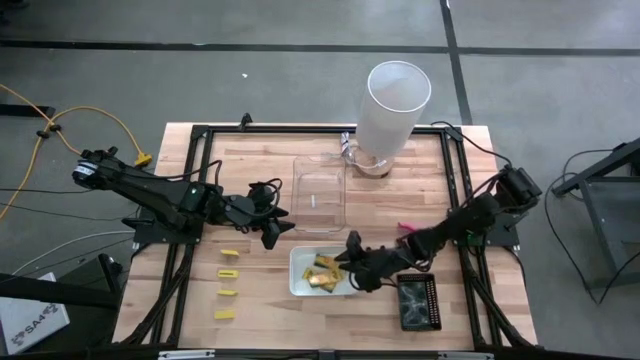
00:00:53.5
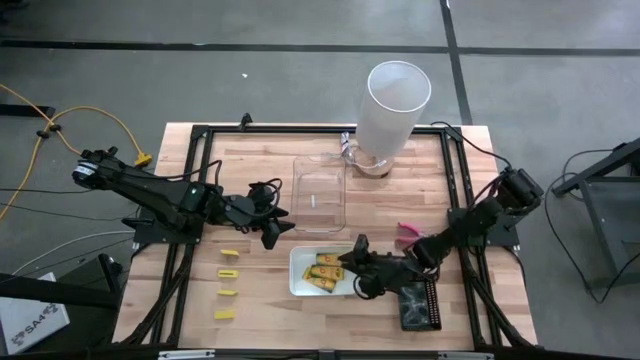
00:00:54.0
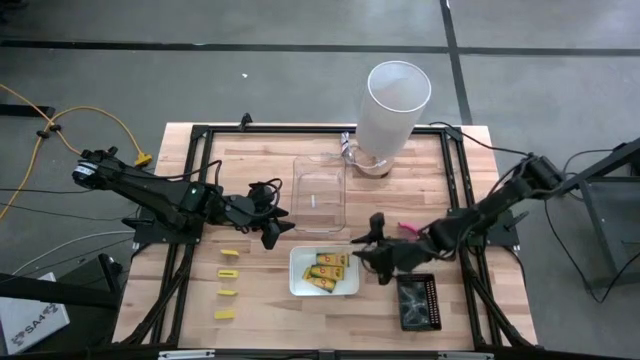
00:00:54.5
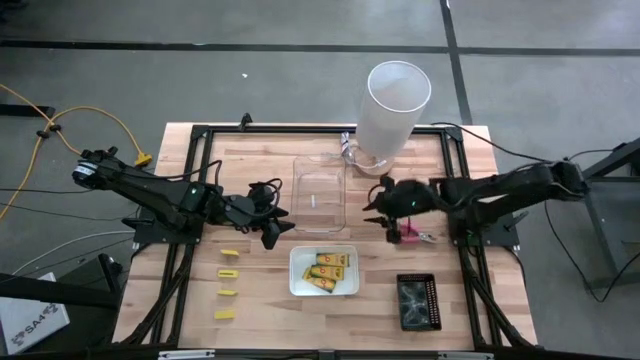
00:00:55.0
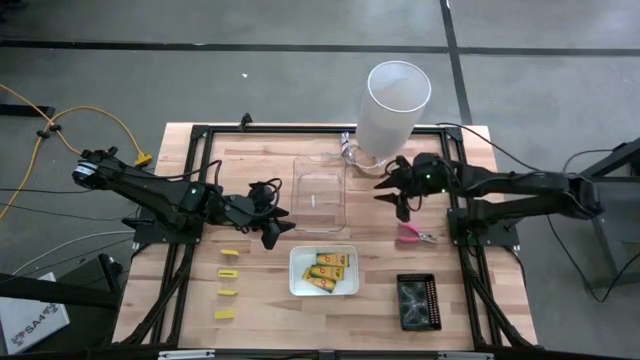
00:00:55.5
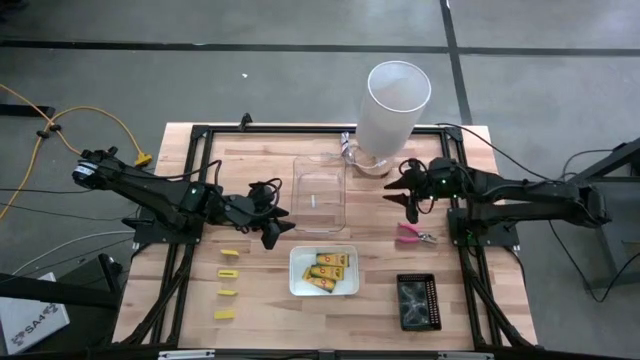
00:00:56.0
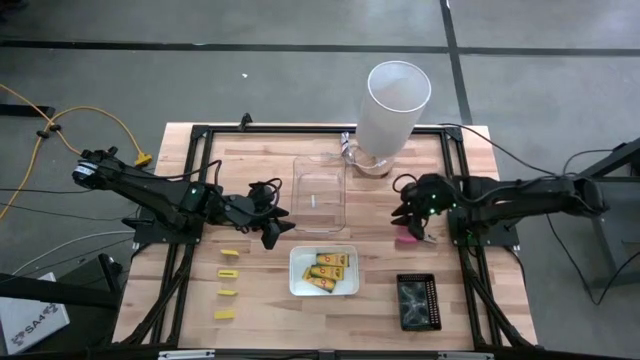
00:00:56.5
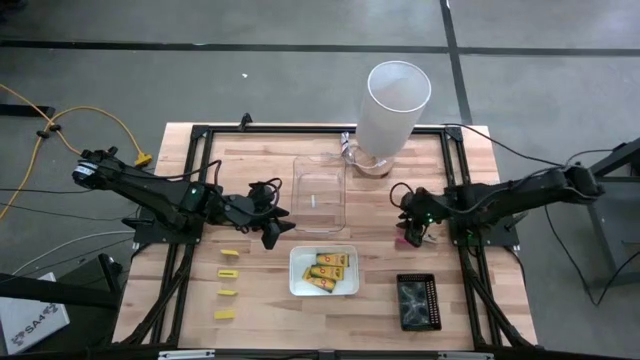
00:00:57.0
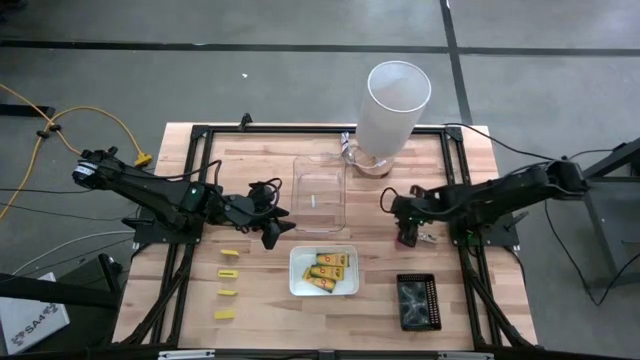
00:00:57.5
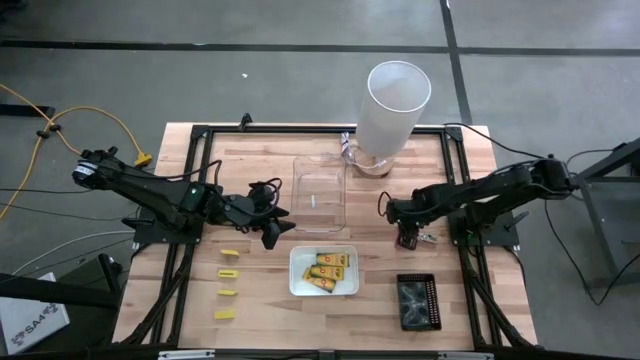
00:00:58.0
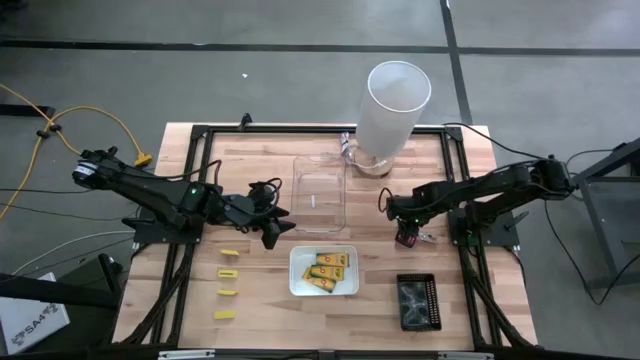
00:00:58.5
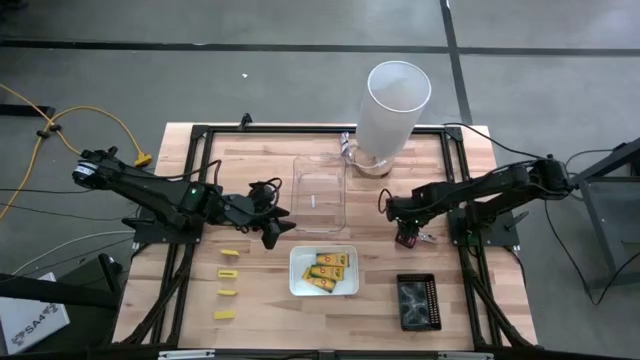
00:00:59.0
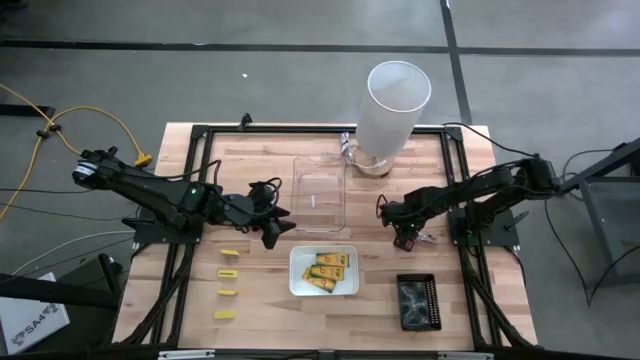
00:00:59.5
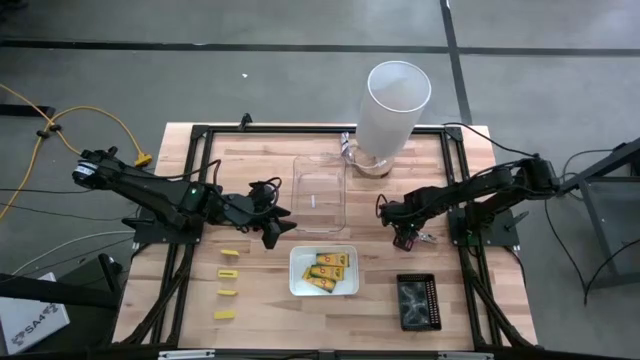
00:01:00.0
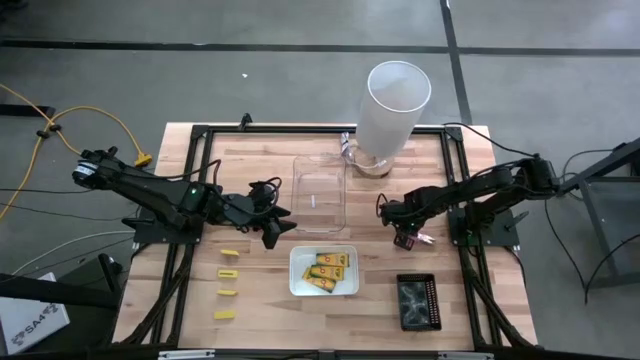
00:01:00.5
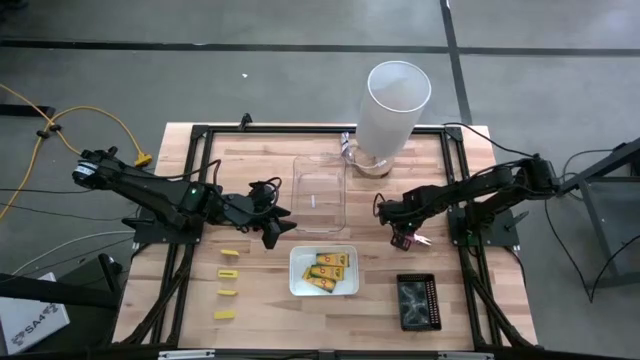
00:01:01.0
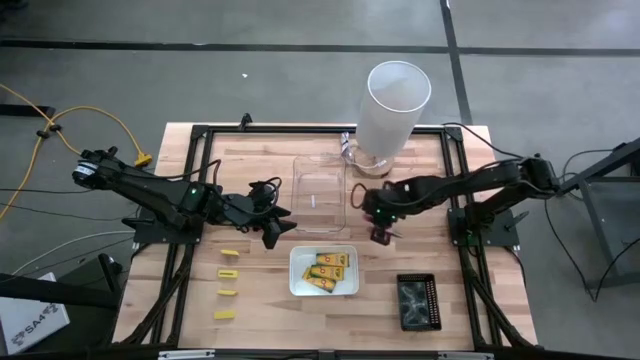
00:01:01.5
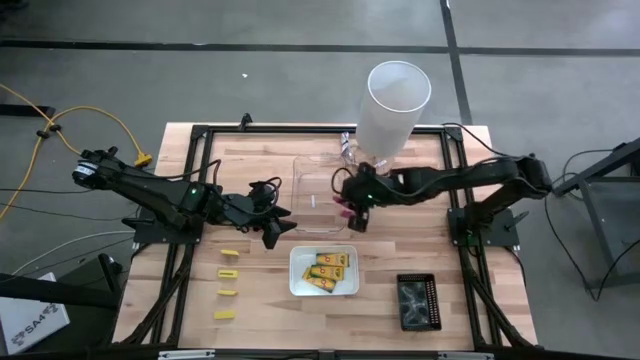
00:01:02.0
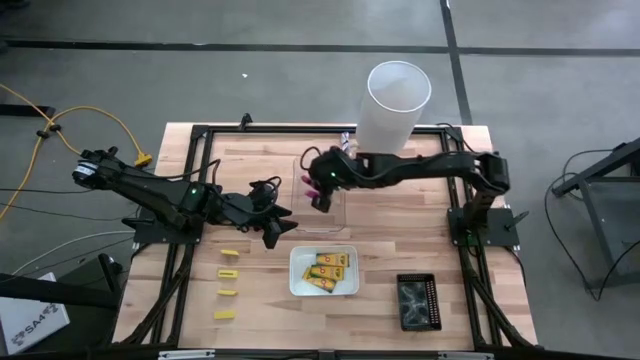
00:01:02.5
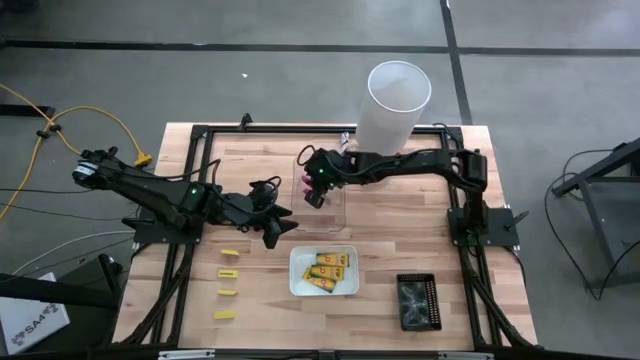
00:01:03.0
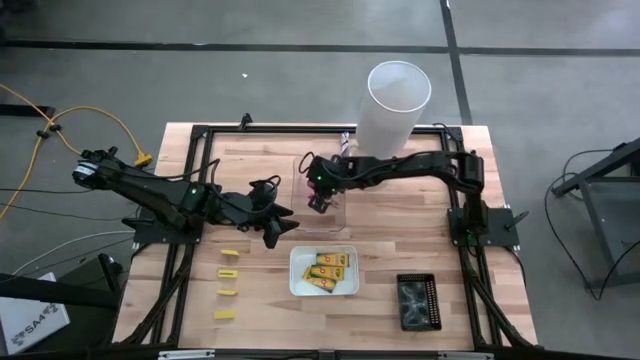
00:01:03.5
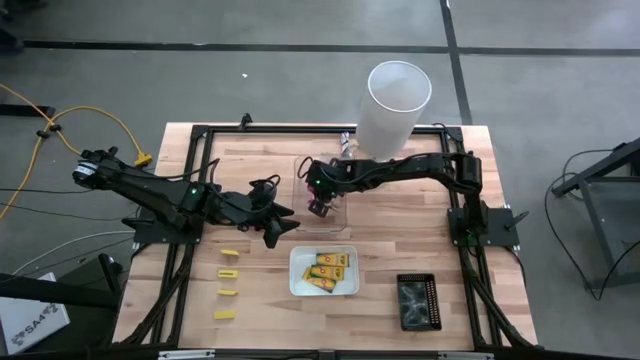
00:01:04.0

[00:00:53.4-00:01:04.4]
Task: Pick & Place School Supplies
Put the pink hole puncher into the transparent bin

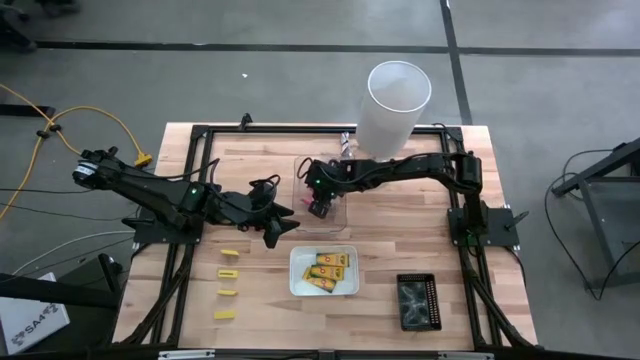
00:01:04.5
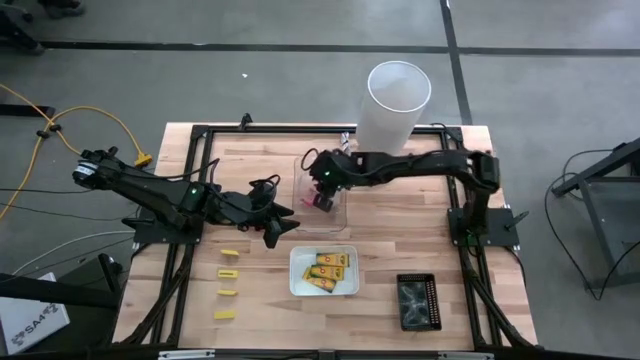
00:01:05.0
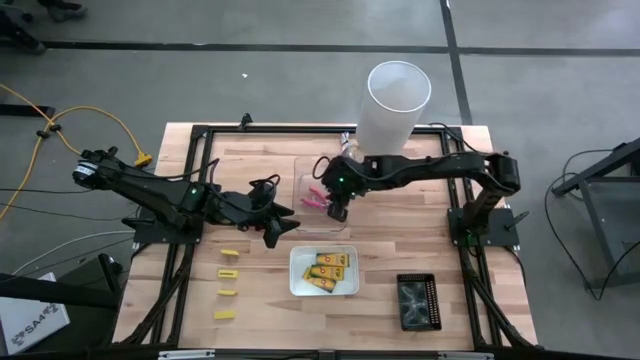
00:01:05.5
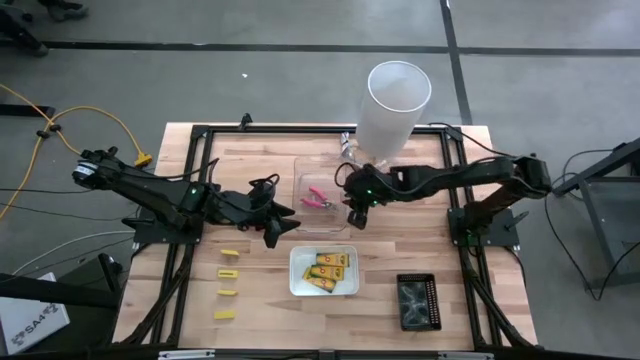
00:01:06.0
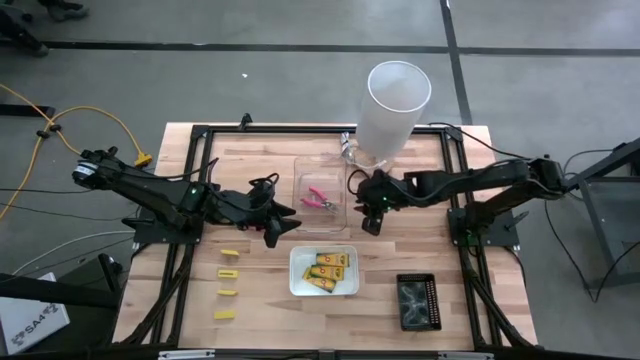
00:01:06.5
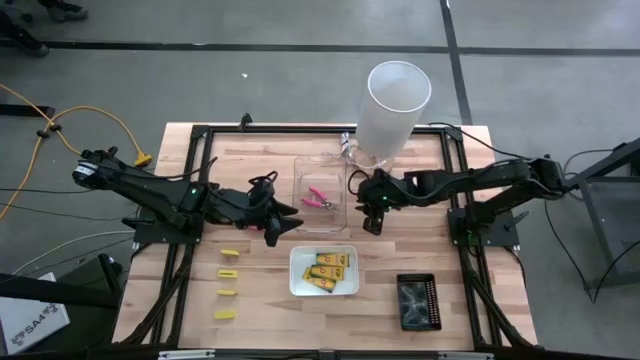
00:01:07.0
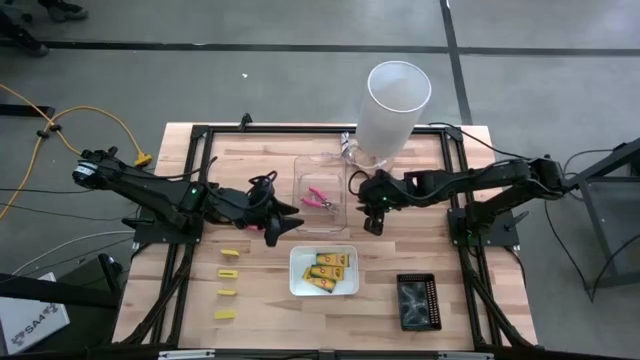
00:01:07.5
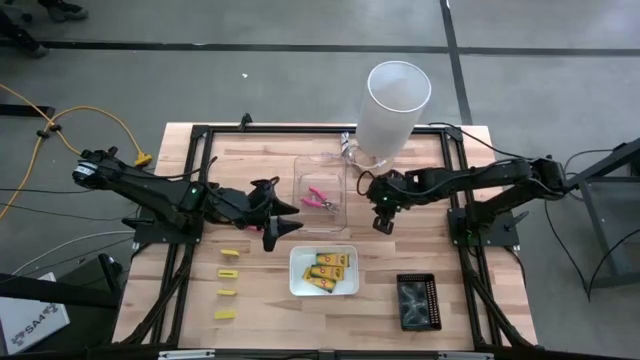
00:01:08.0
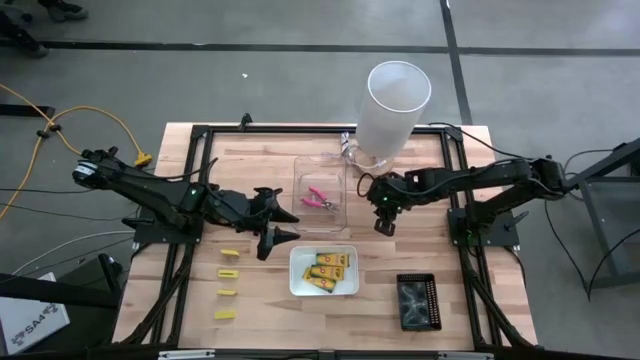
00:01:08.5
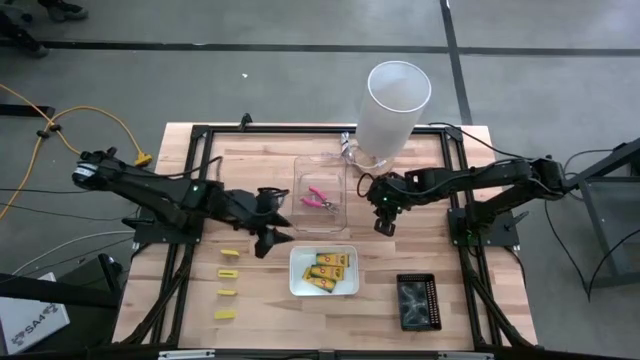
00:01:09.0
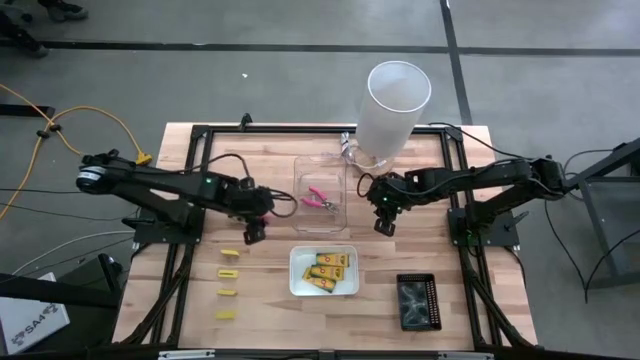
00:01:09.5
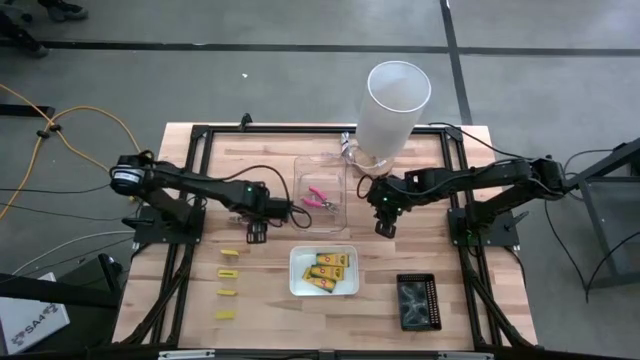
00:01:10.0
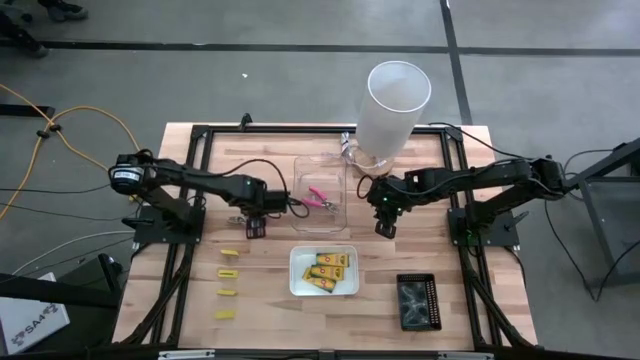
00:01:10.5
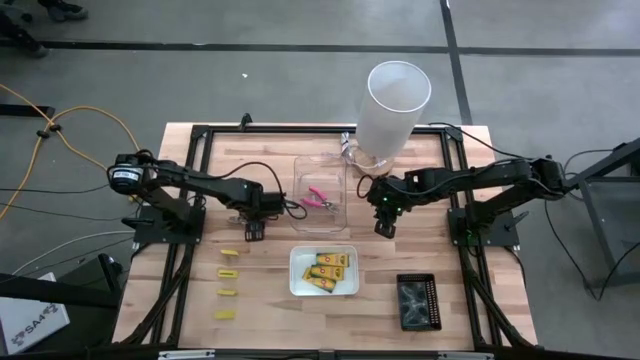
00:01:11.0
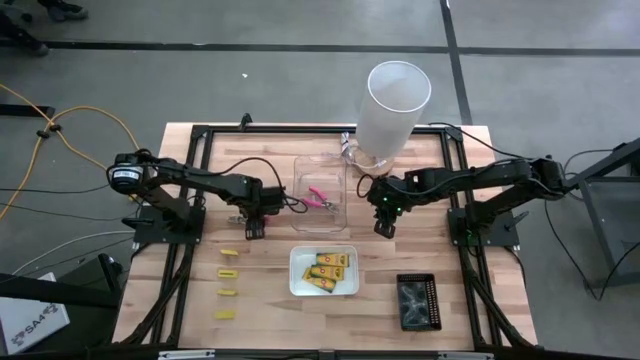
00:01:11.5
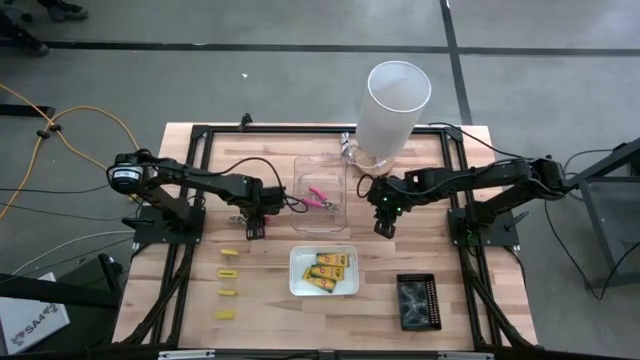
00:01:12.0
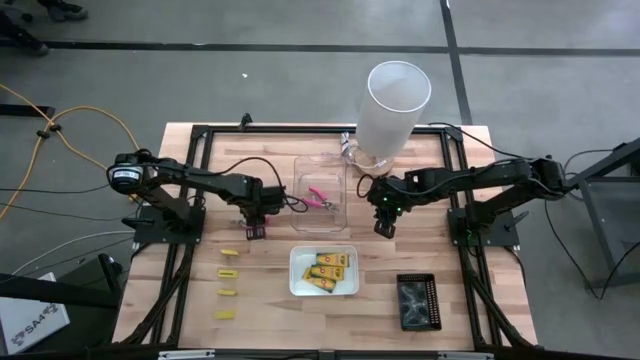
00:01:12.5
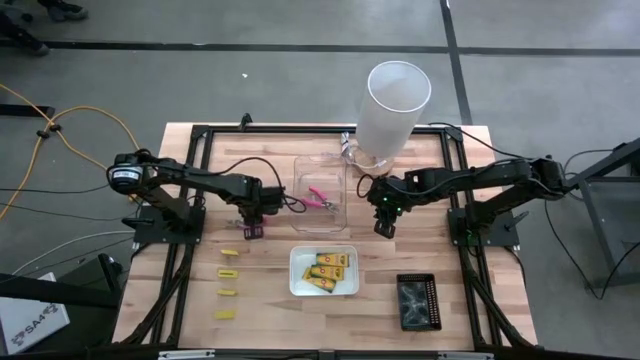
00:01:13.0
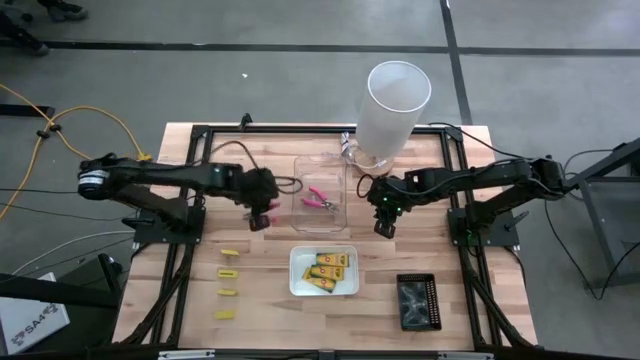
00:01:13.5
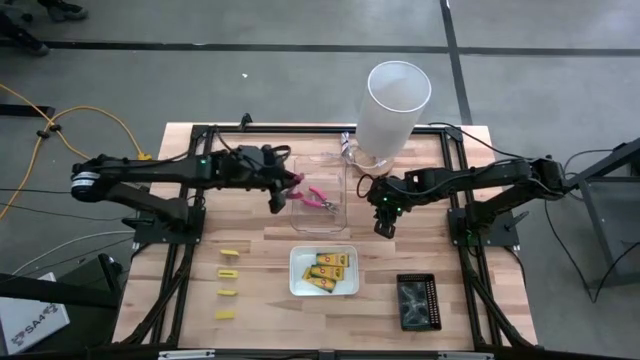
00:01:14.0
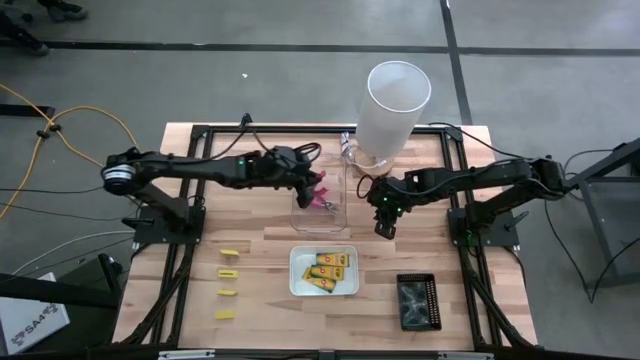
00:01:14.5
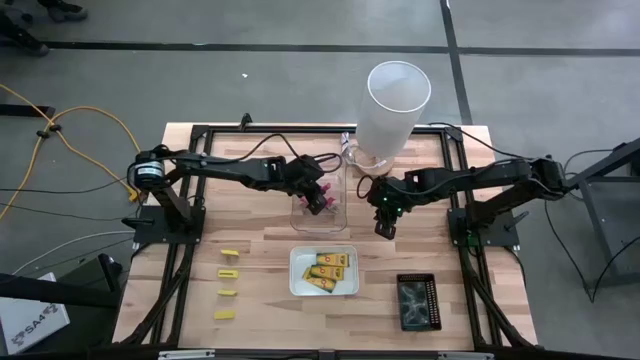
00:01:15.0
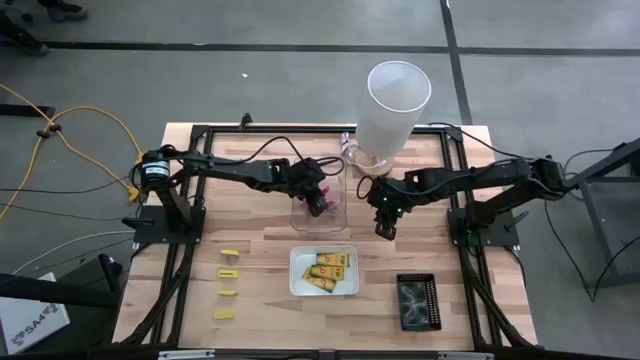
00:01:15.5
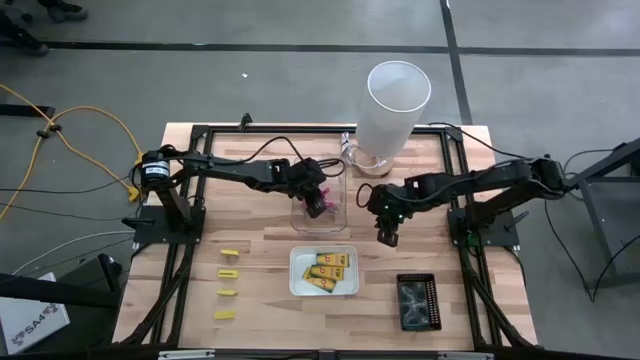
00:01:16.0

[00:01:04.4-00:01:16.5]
Put the pink hole puncher into the transparent bin
